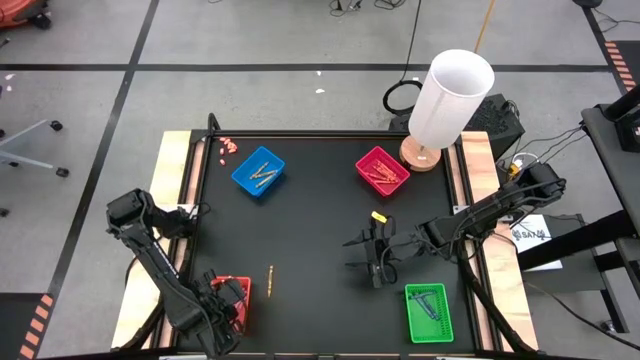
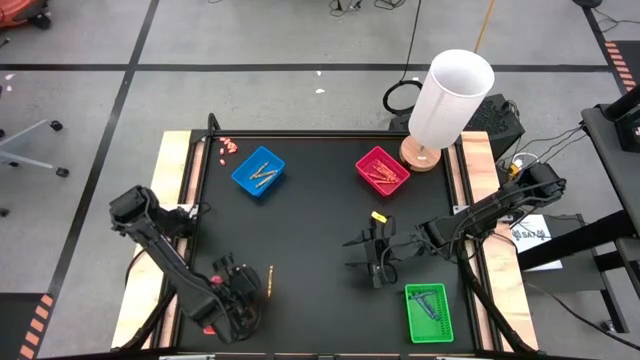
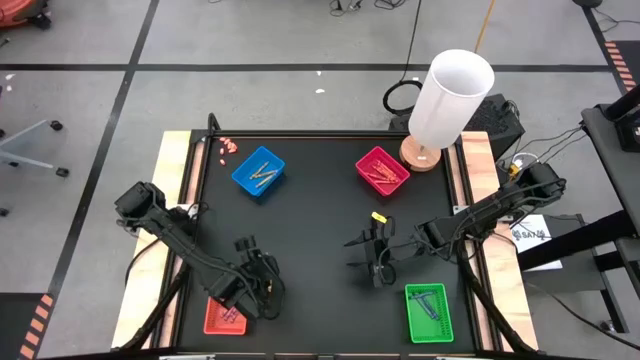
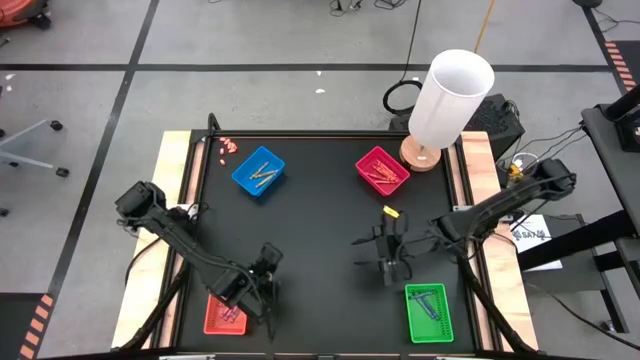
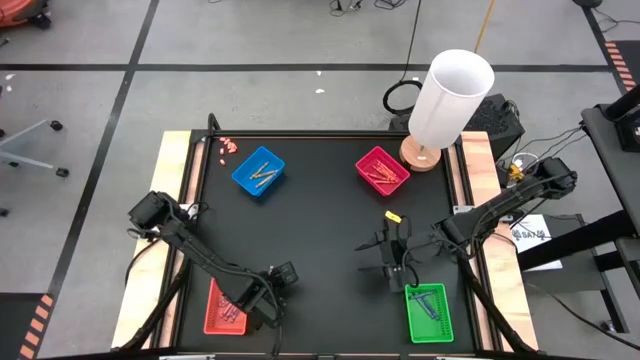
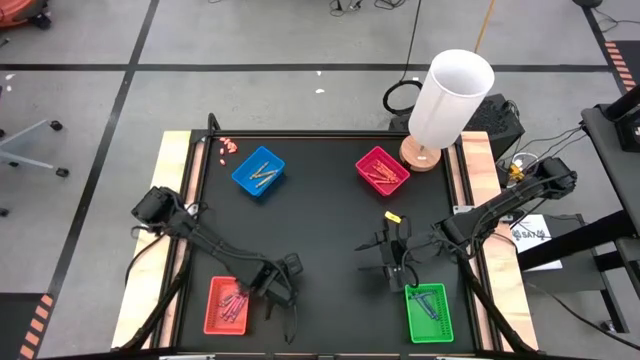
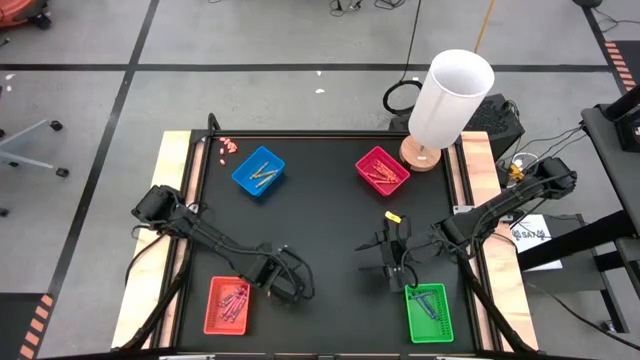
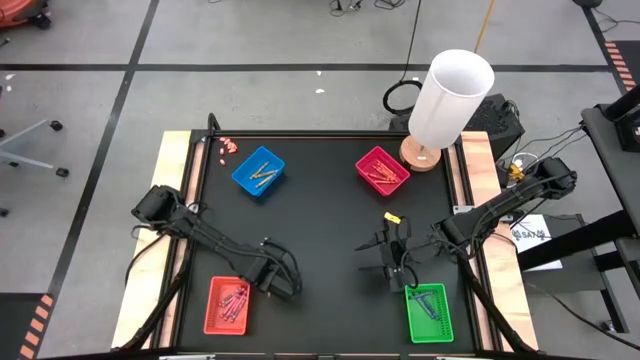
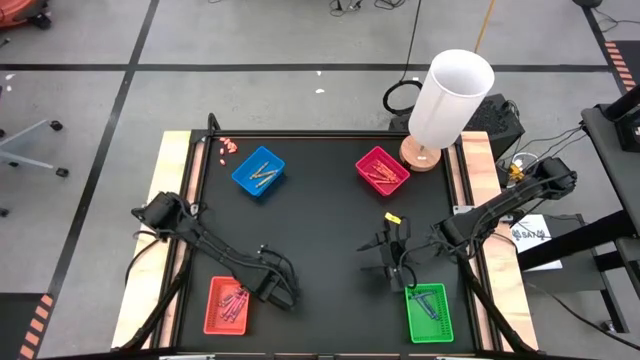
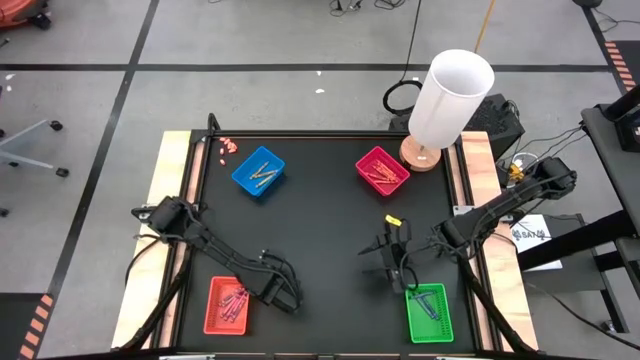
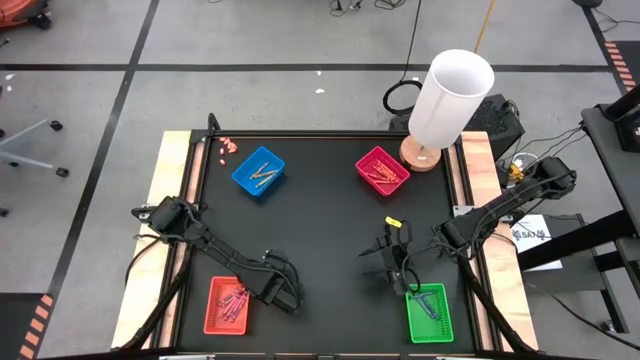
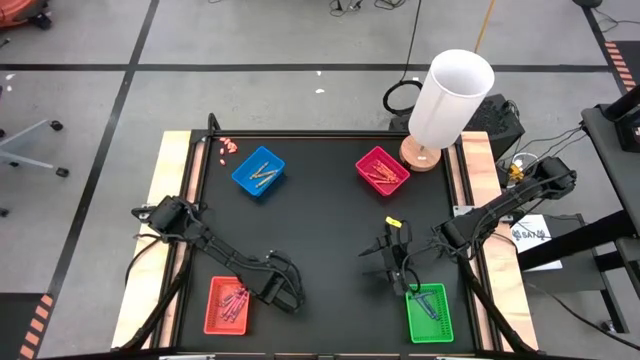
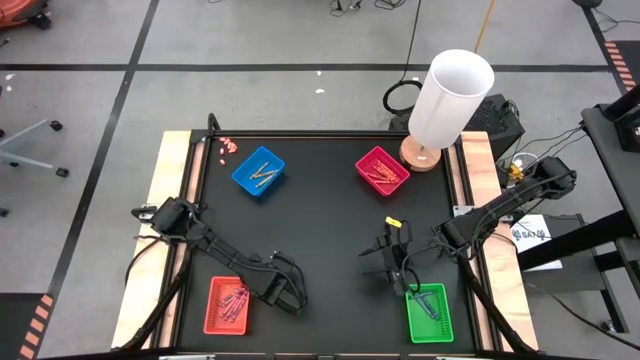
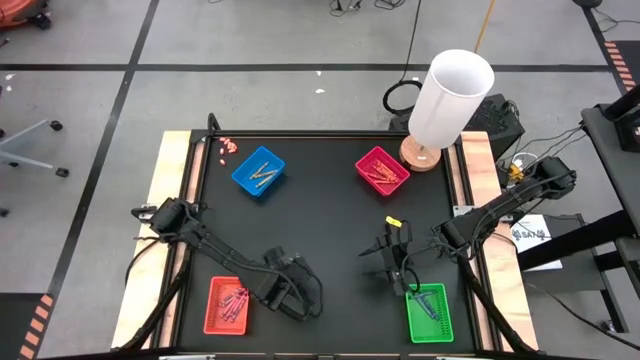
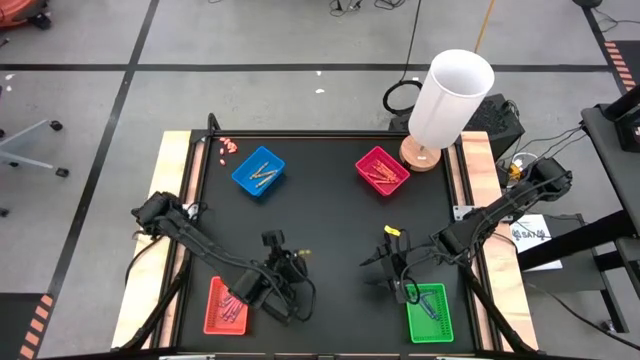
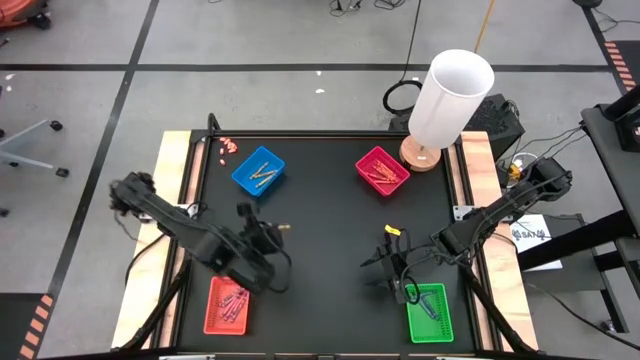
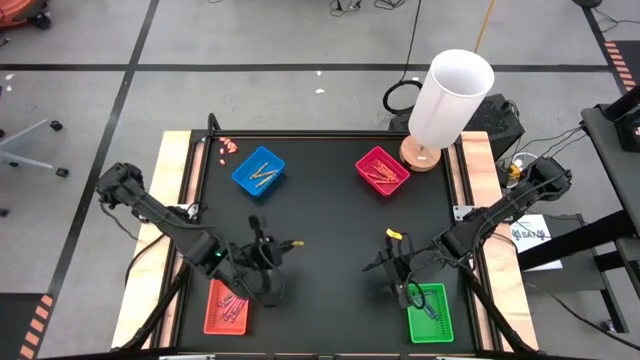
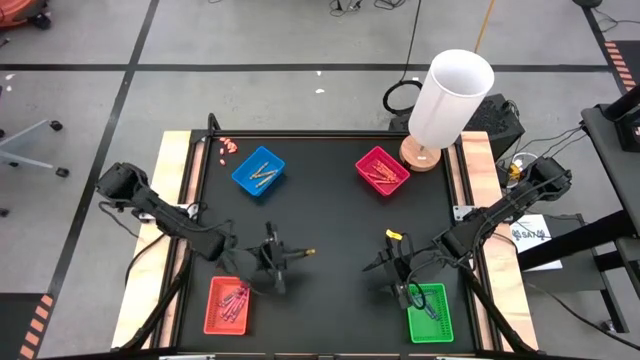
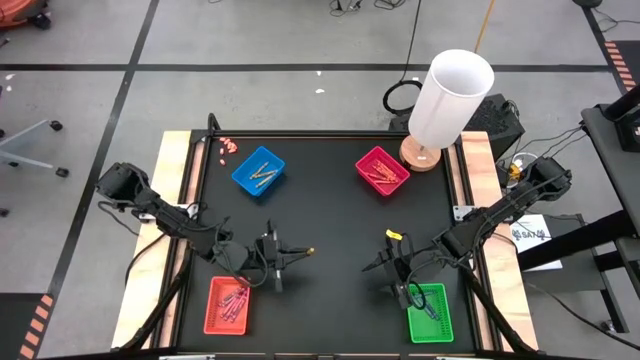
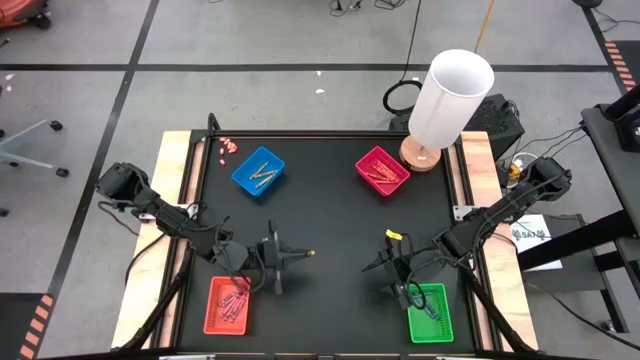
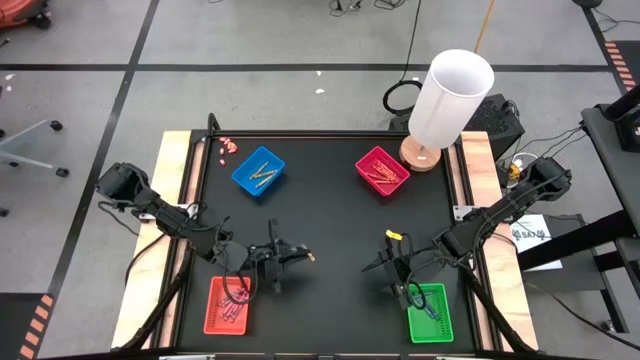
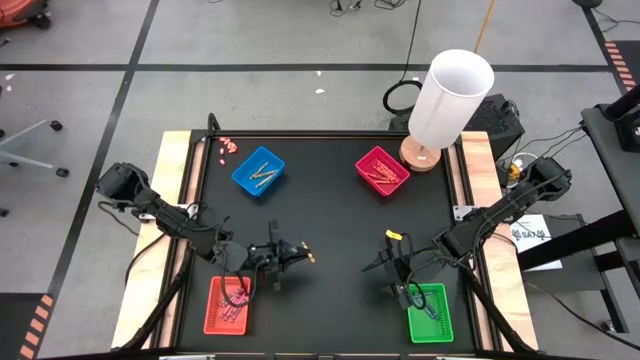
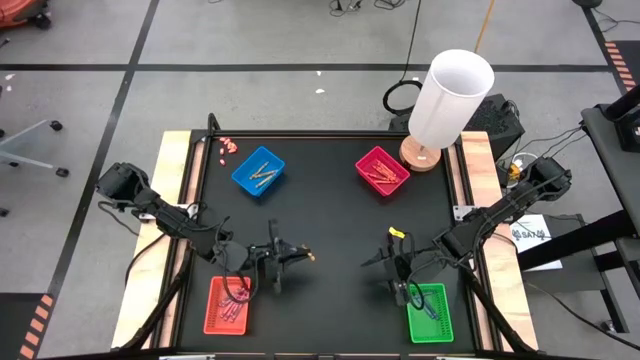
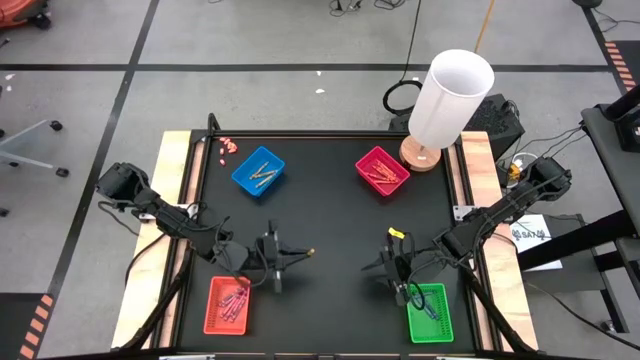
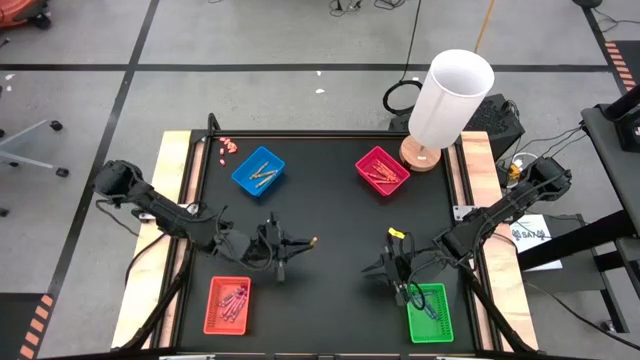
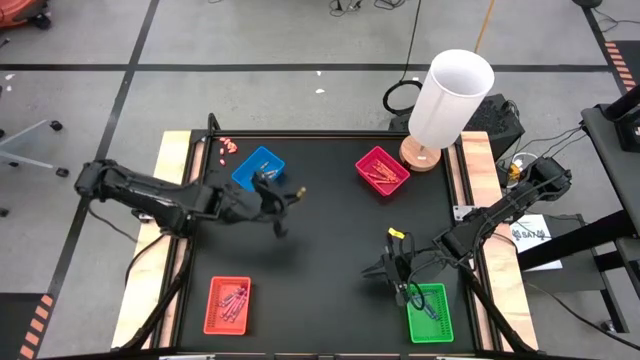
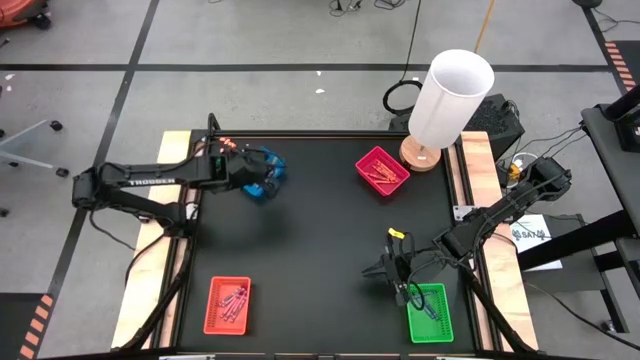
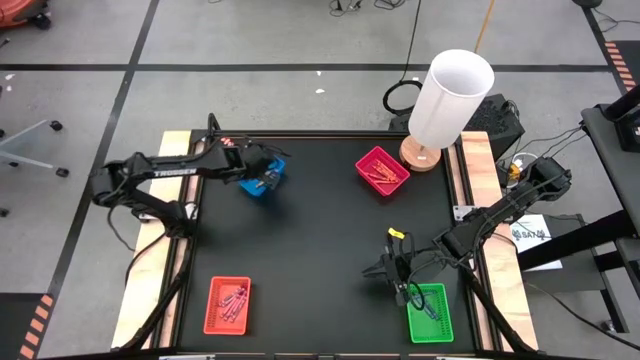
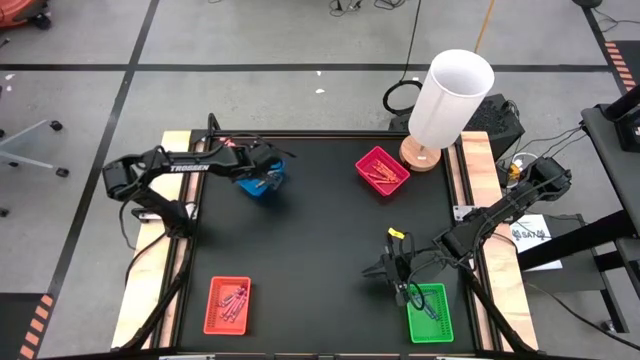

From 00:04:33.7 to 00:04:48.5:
Task: Sort crayons
Put the yellow crayon into the blue bin

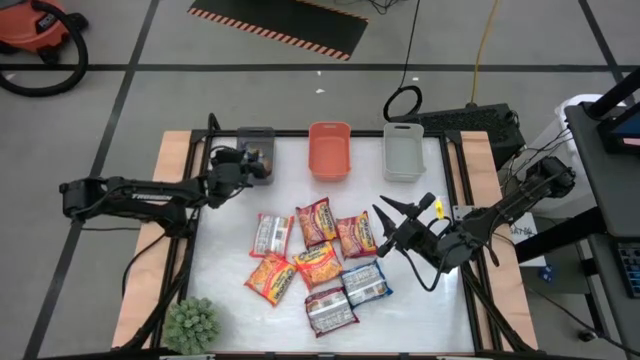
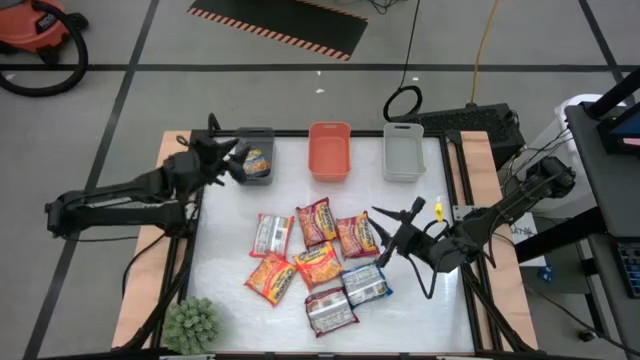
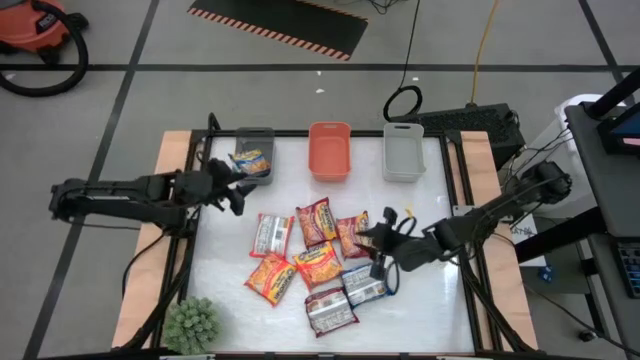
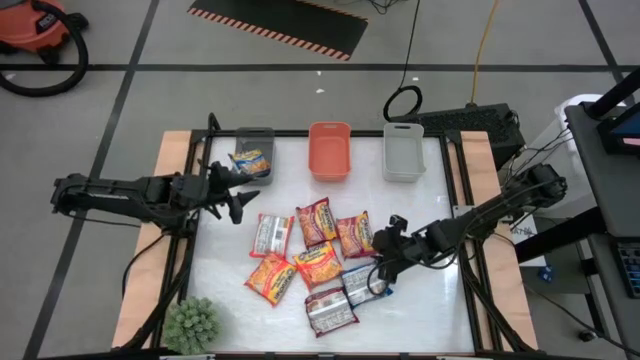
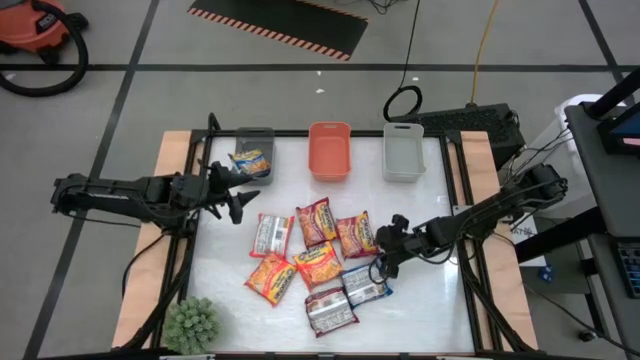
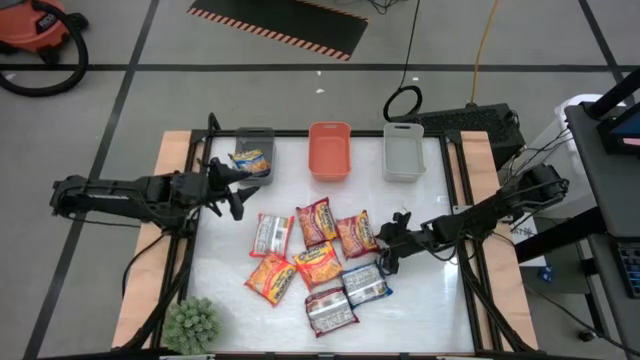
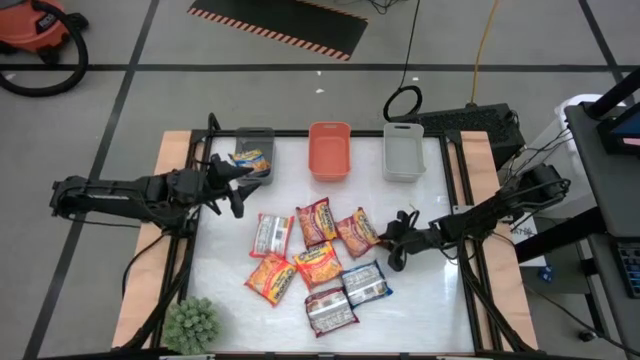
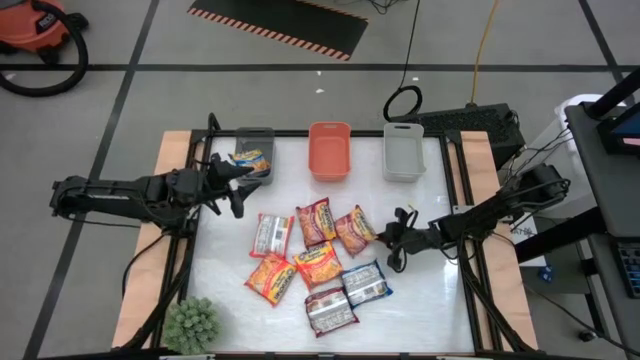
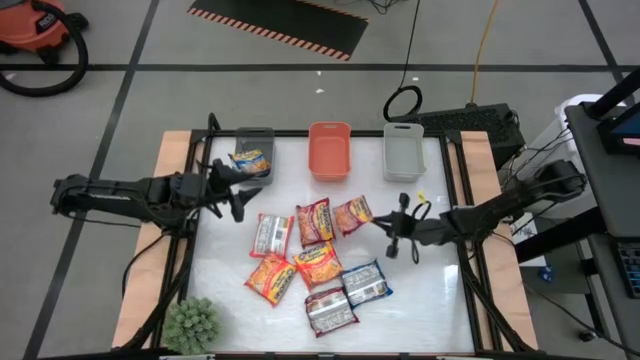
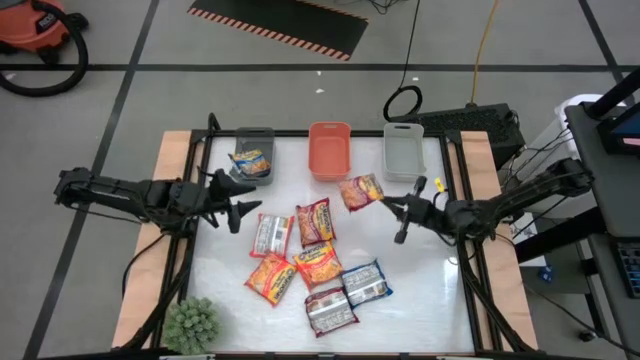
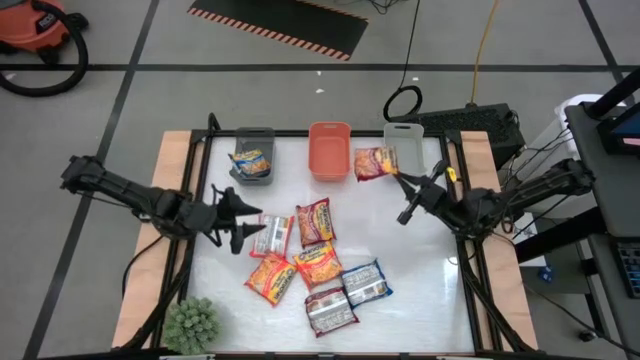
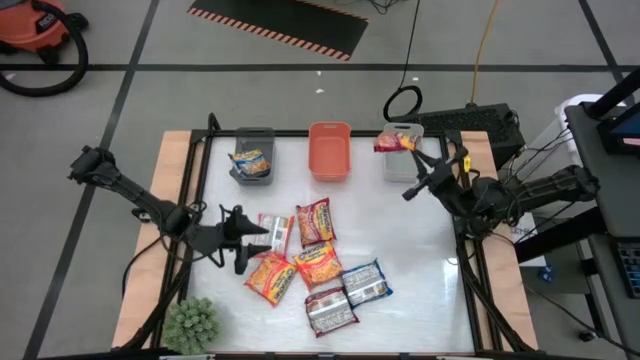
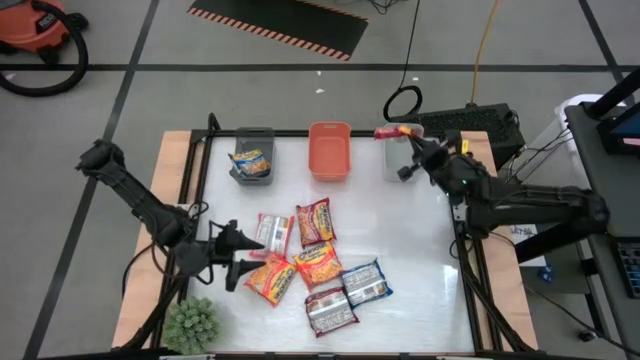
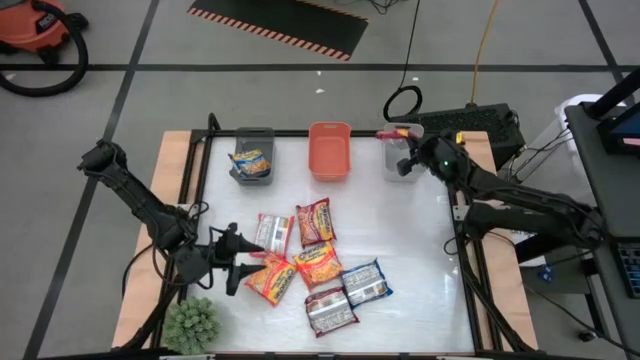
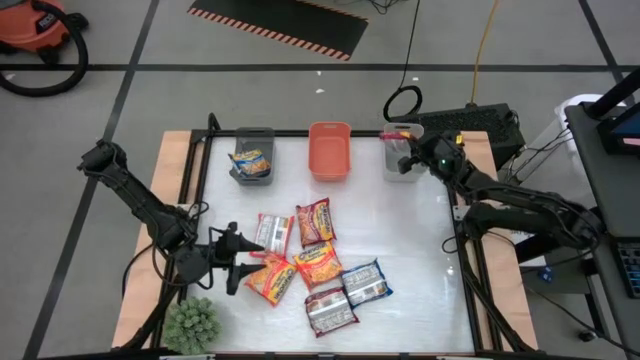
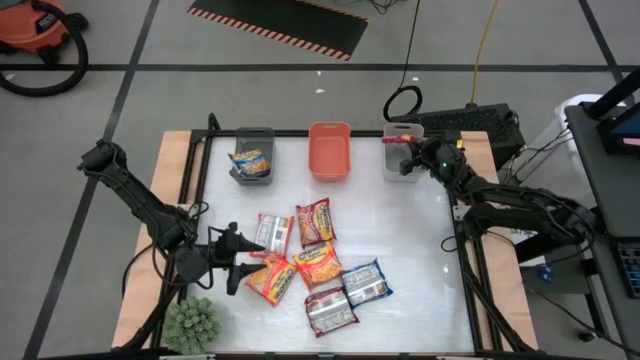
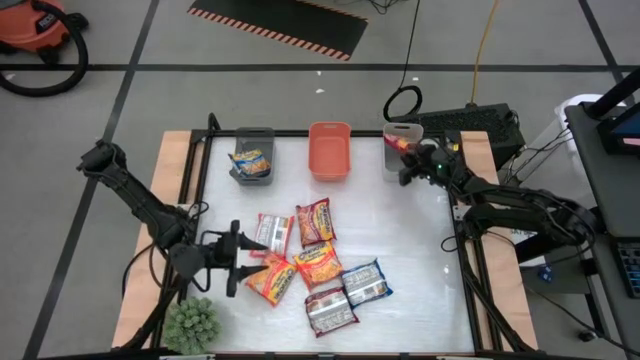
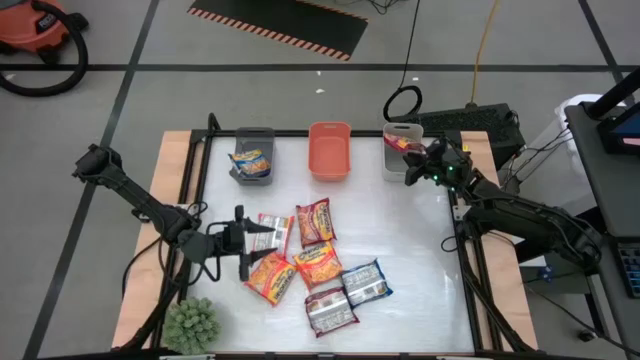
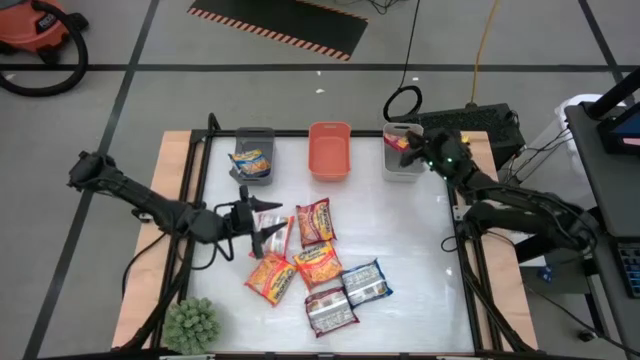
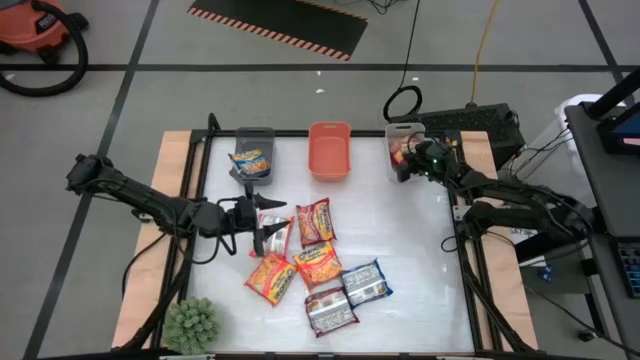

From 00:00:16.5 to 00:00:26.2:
Task: Sort Maruchan noodles
Put the top right red noodle pack into the gray bin
